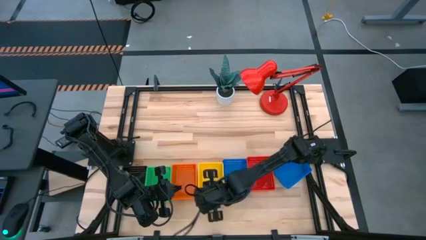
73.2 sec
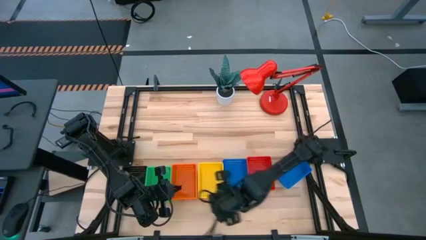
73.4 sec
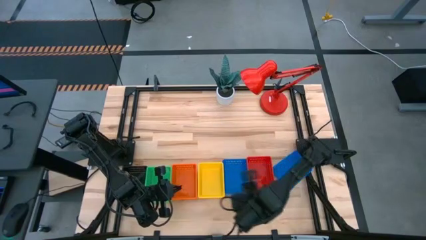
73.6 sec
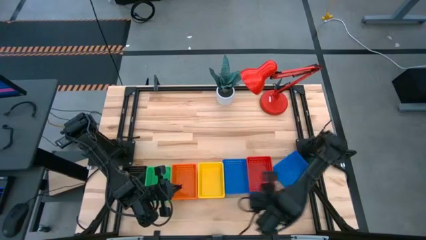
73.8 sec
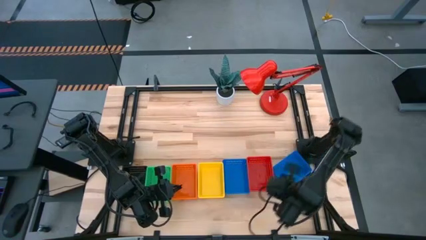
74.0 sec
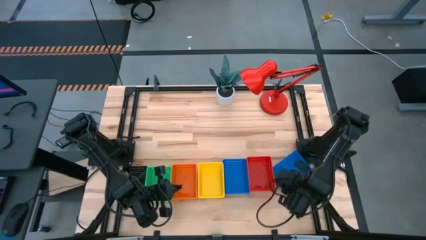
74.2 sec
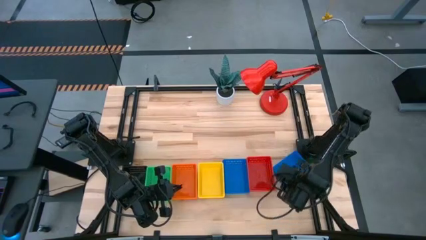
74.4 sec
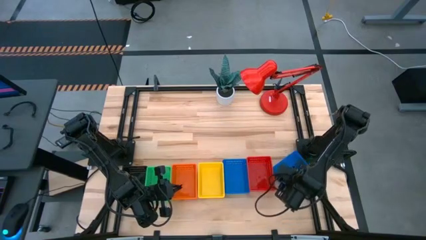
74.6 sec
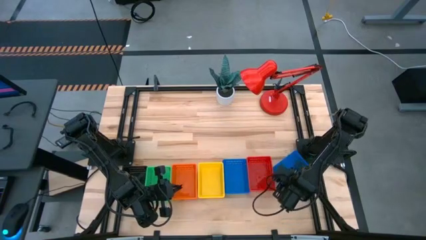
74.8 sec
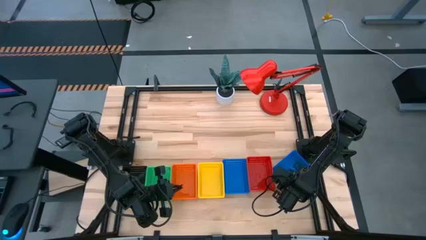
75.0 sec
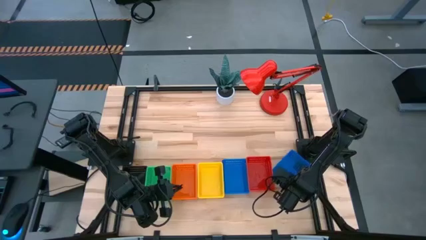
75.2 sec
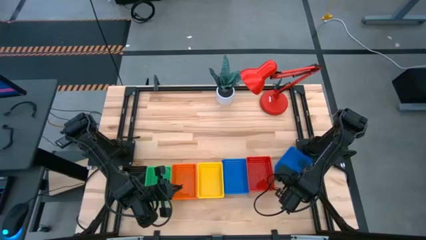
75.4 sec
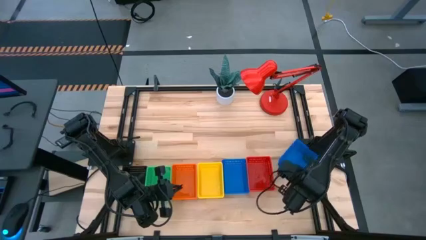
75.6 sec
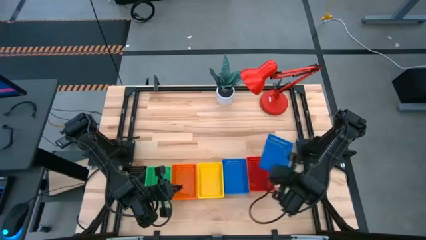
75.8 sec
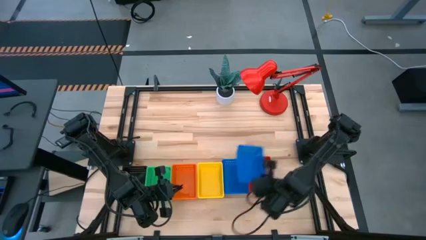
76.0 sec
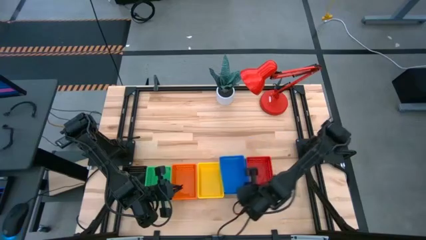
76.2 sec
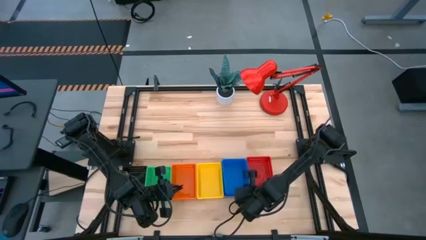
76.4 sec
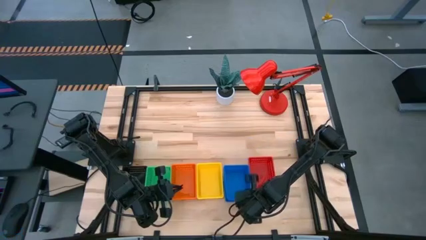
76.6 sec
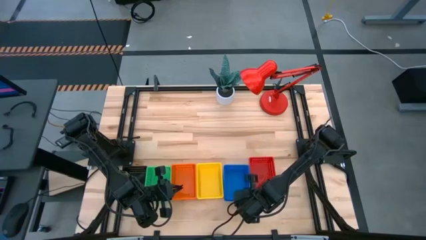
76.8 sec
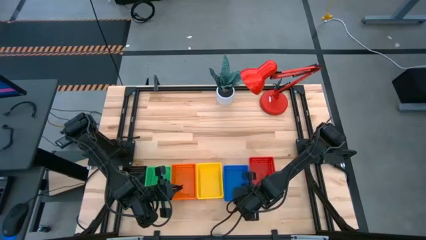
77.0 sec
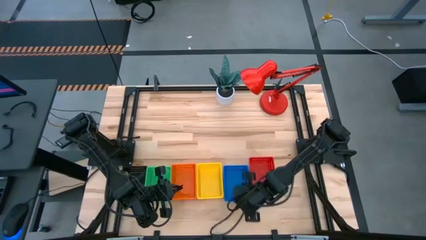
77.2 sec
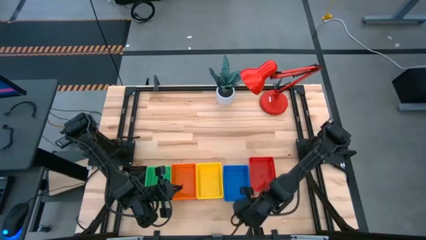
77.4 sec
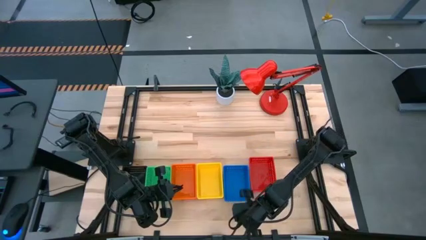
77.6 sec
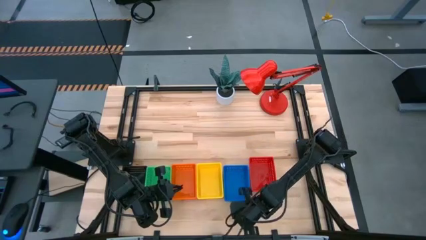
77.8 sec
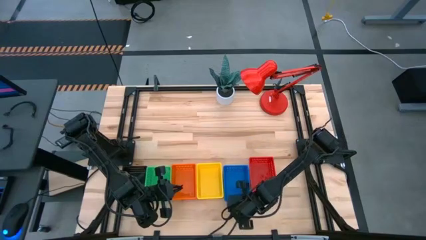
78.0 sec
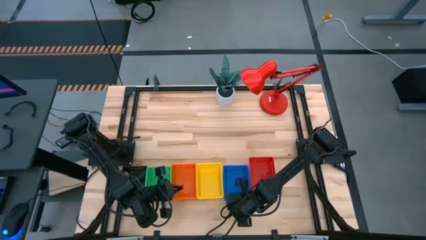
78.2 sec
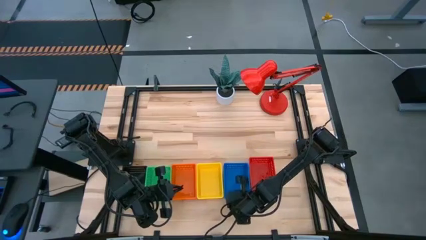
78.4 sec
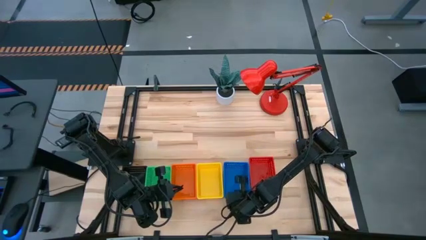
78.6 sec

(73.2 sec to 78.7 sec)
Stack the right blue bin on top of the left blue bin

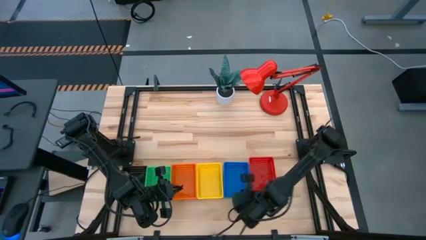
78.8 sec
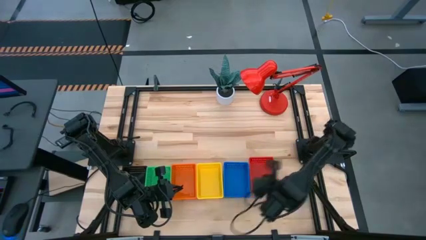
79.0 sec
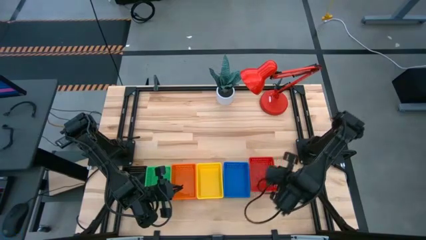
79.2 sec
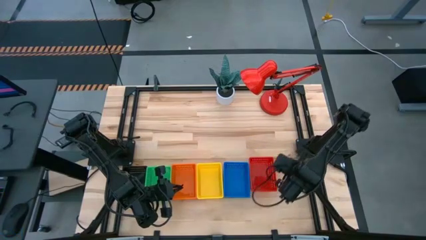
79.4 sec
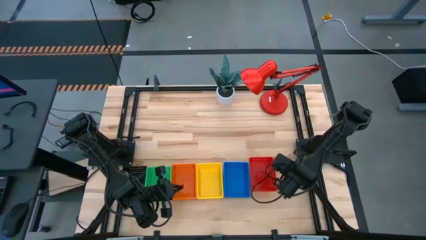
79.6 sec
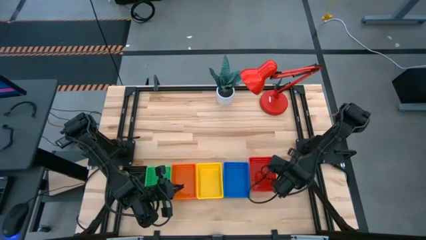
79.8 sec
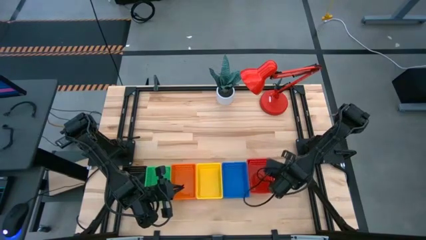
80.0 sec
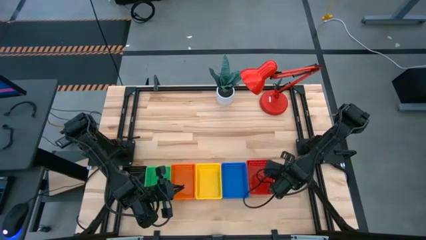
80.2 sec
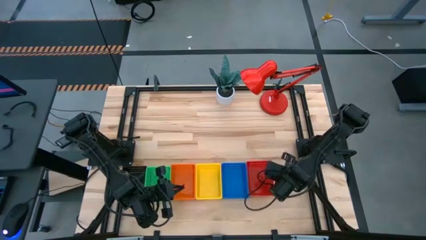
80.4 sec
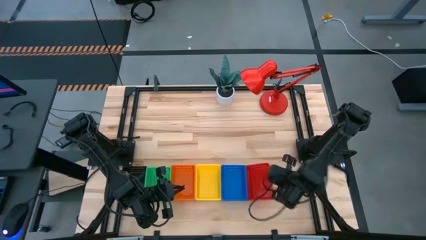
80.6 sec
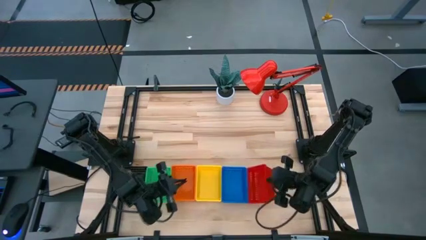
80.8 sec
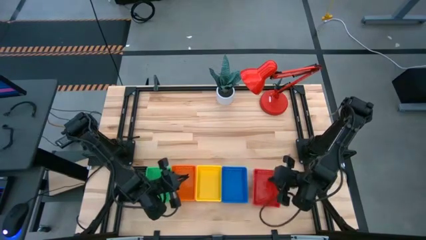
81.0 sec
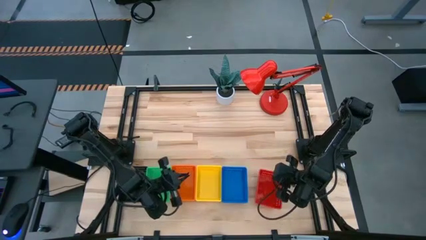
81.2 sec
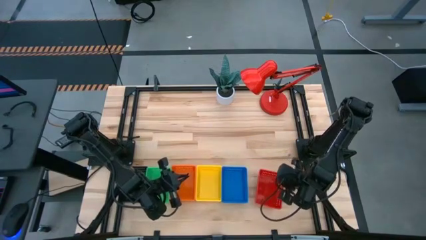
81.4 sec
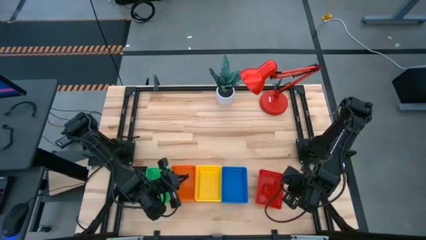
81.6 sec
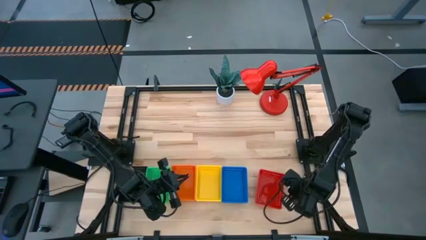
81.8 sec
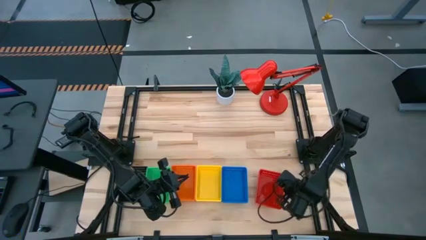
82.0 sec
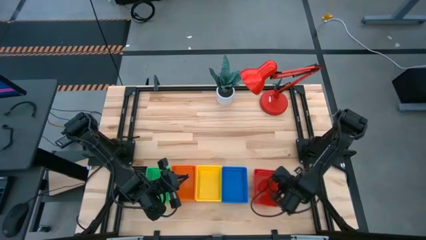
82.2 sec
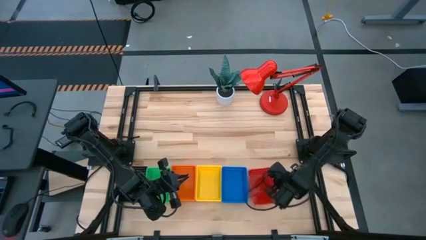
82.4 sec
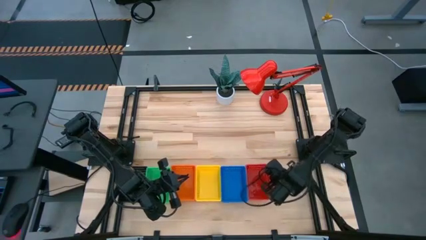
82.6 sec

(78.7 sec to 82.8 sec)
Adjust the stacked red bins

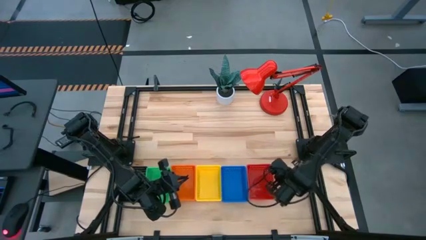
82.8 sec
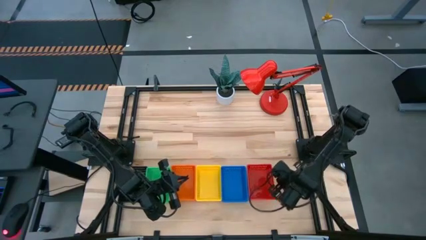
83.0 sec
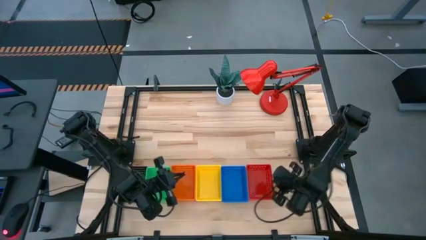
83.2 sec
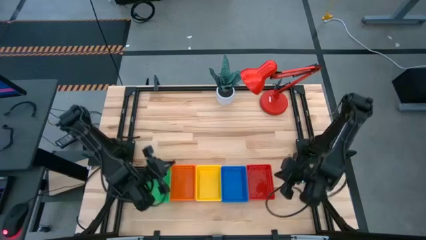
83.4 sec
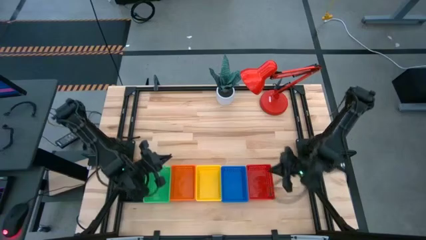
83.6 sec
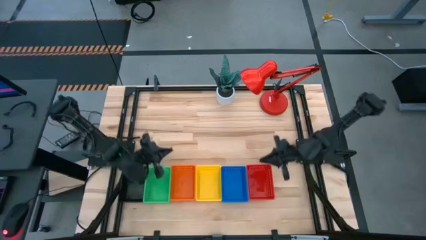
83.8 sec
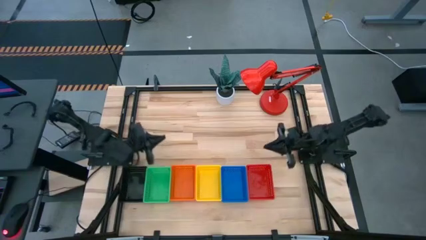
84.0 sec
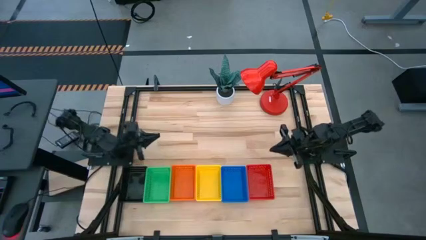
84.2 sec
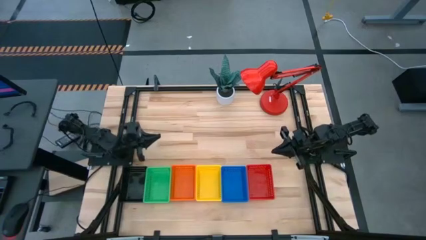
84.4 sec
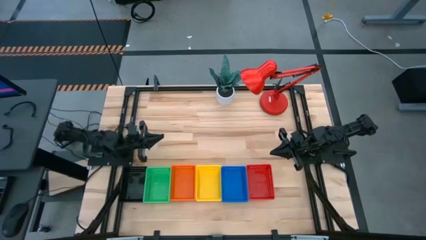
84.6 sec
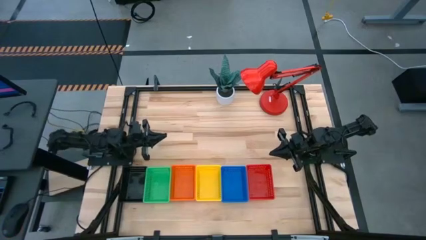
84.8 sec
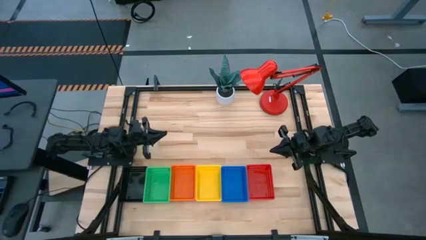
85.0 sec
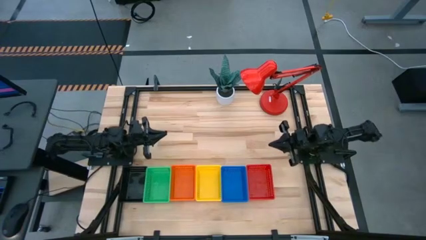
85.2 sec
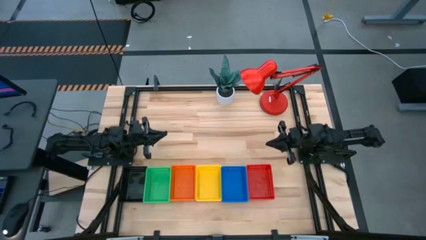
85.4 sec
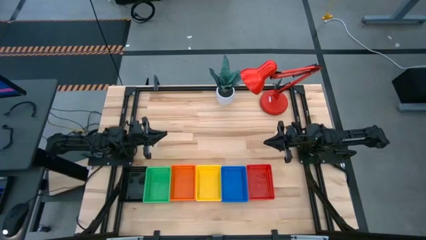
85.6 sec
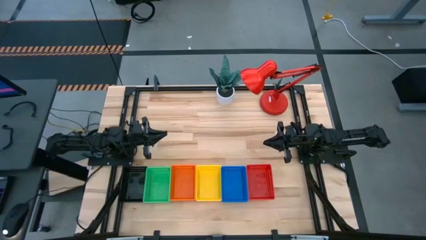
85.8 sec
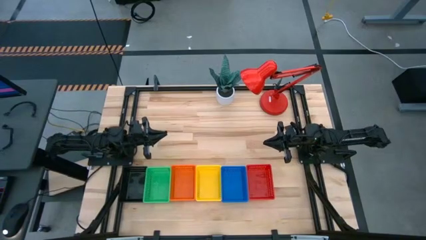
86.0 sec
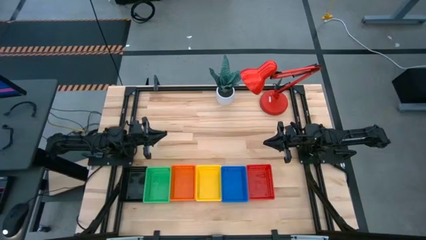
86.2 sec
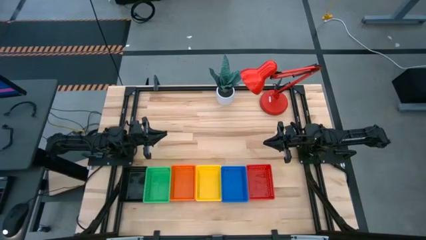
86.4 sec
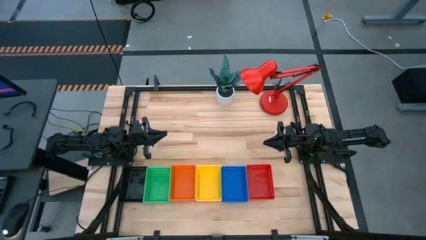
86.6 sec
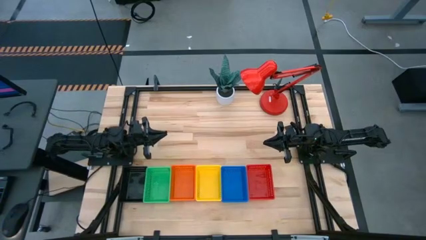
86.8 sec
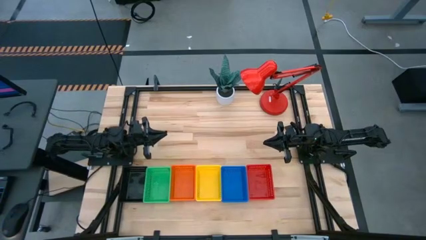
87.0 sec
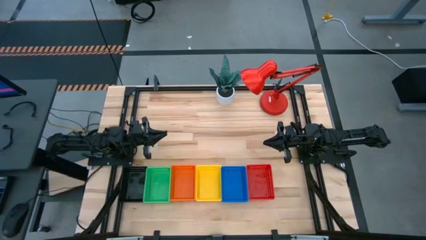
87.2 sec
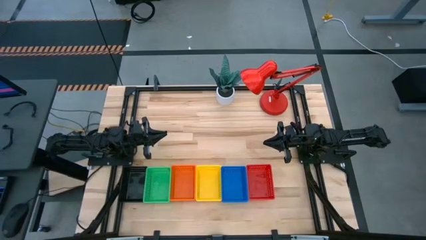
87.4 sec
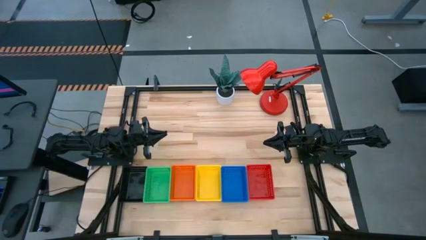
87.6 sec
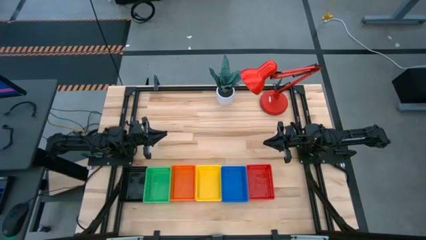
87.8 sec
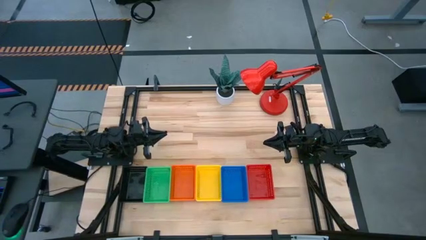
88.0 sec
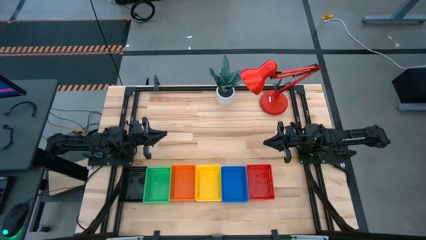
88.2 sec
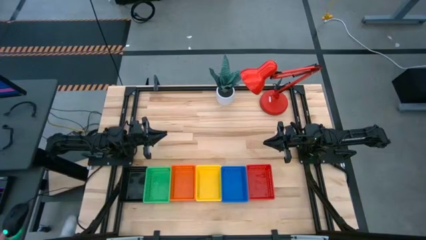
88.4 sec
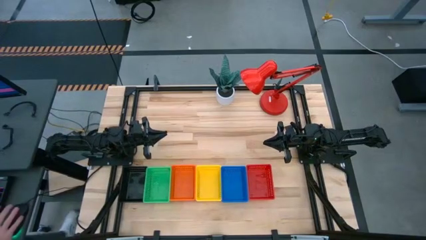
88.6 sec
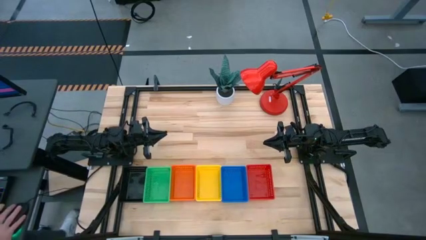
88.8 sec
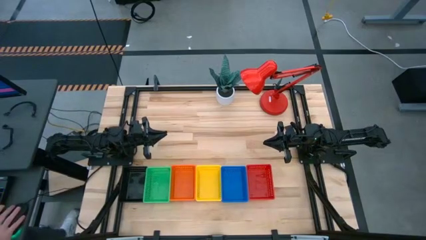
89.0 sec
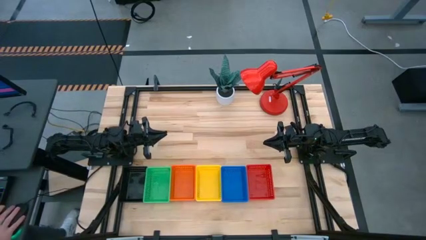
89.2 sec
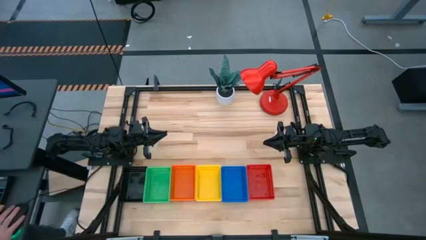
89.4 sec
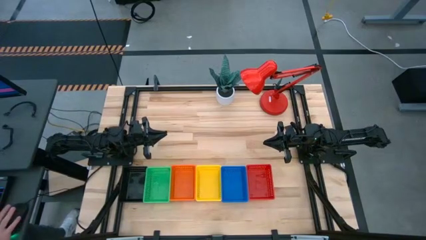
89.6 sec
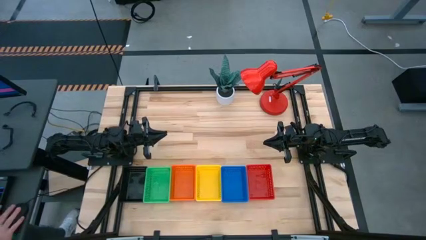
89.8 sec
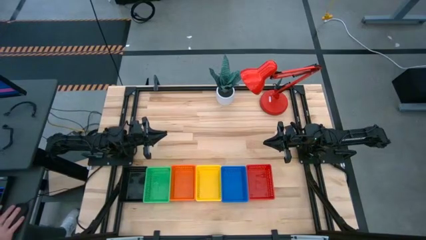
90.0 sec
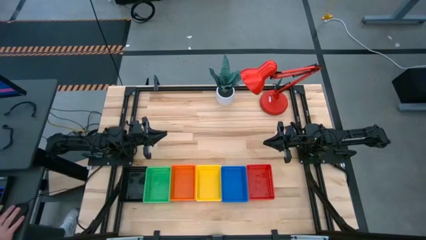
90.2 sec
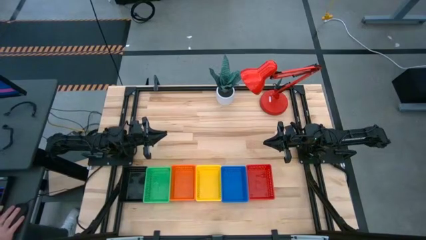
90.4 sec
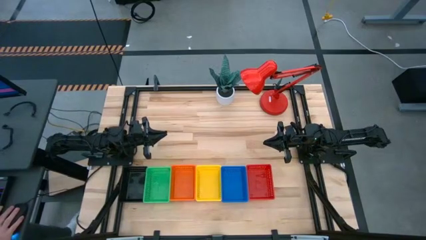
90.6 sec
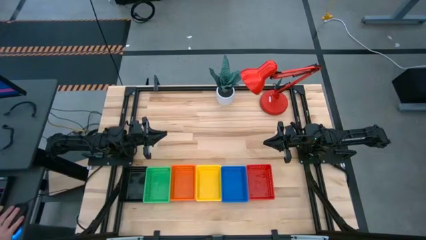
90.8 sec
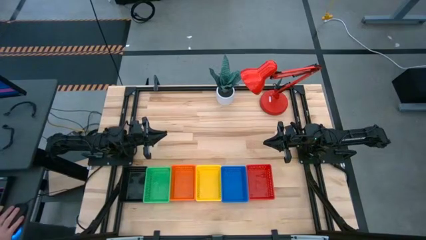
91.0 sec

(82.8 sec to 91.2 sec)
Return to Home Position
